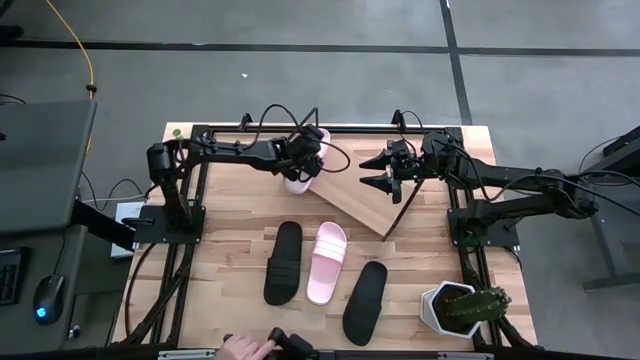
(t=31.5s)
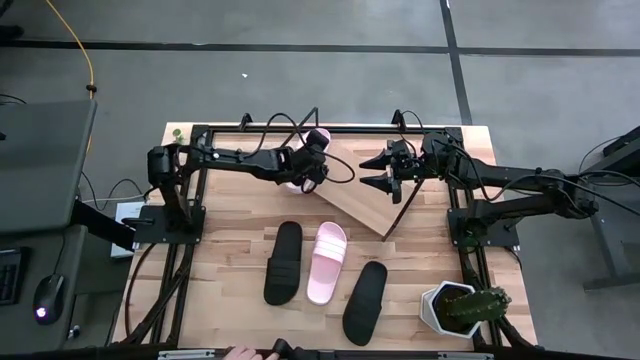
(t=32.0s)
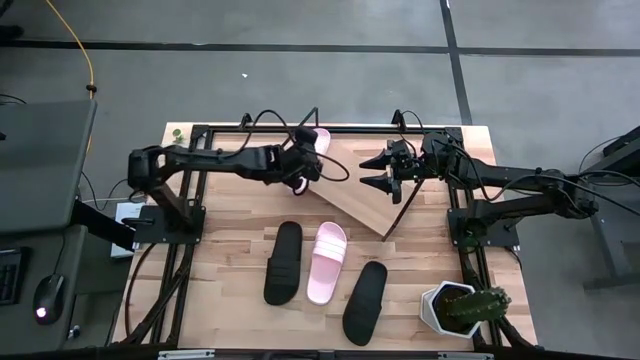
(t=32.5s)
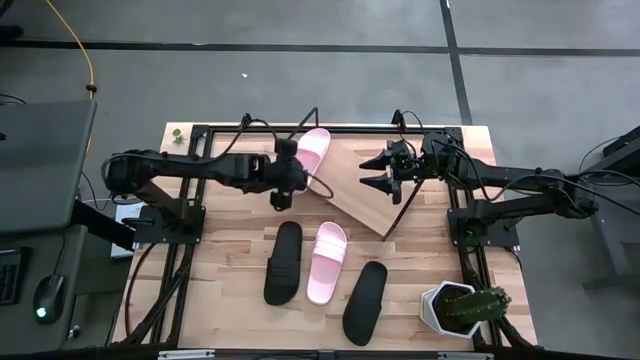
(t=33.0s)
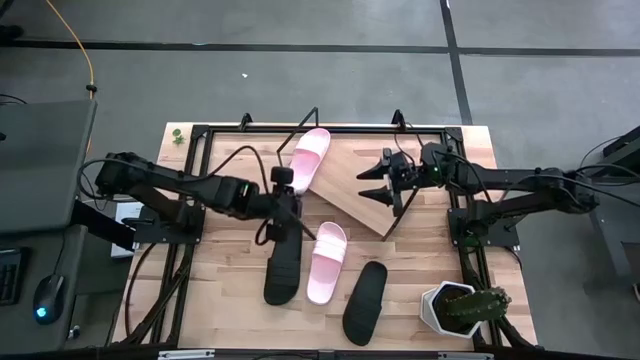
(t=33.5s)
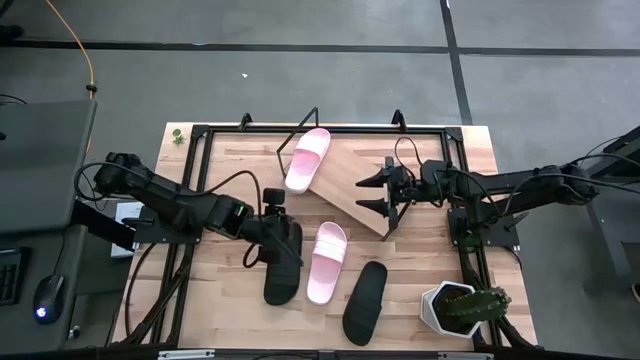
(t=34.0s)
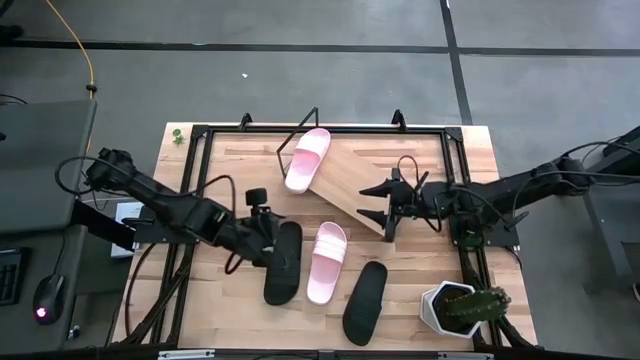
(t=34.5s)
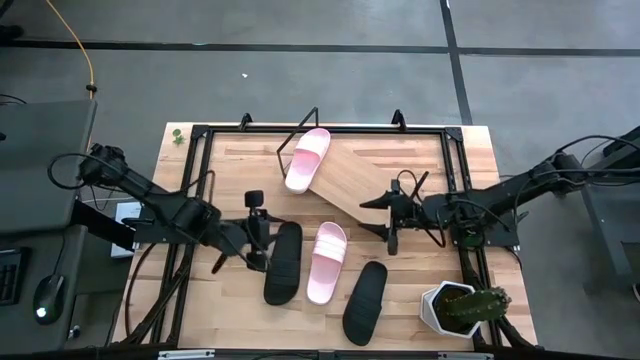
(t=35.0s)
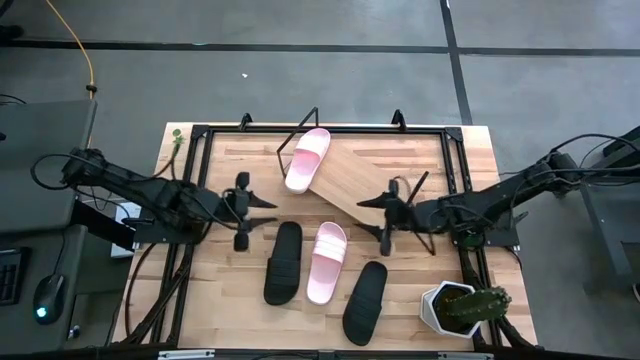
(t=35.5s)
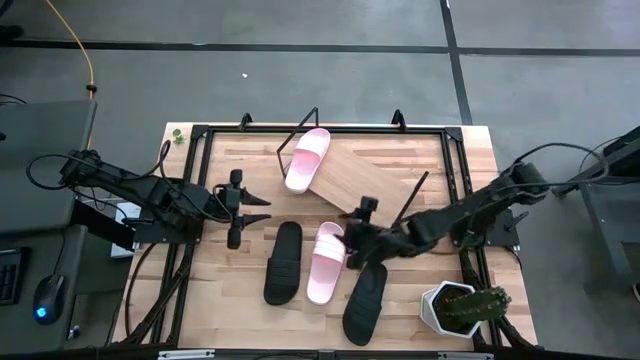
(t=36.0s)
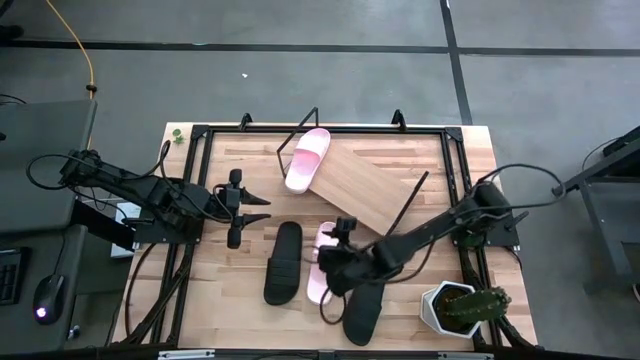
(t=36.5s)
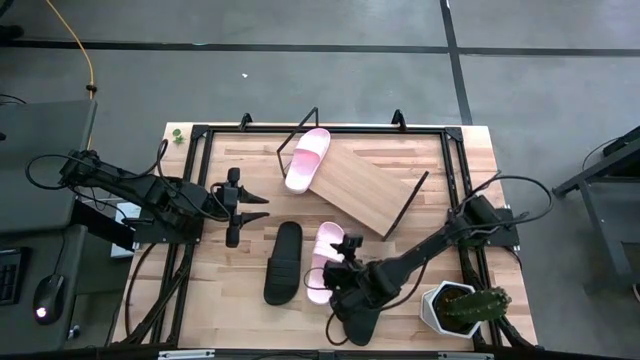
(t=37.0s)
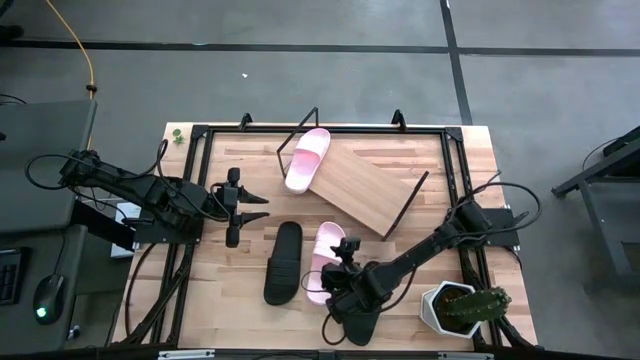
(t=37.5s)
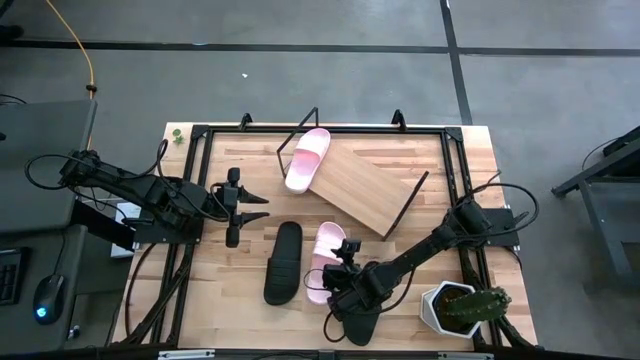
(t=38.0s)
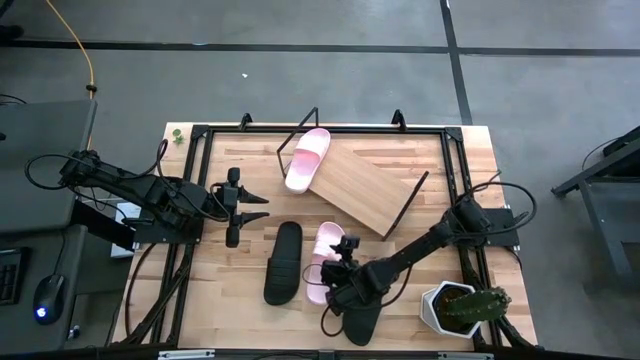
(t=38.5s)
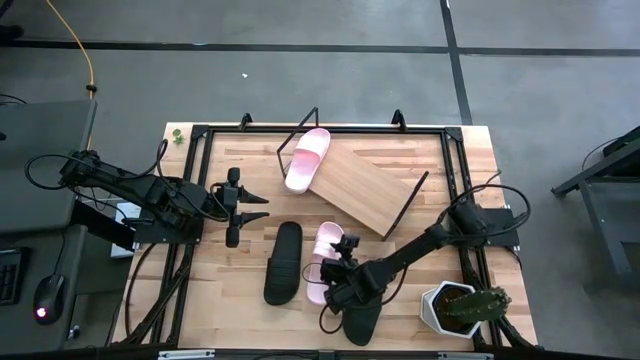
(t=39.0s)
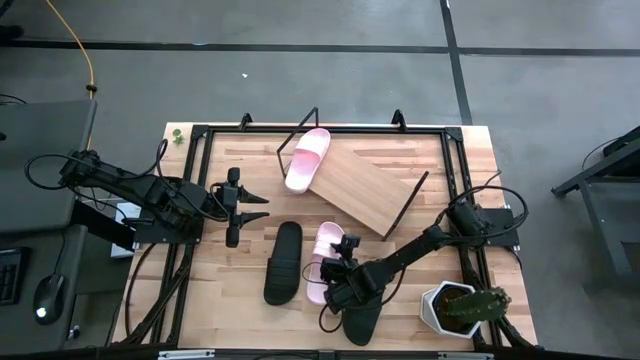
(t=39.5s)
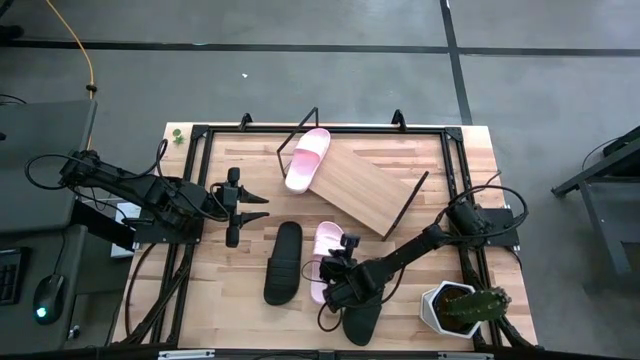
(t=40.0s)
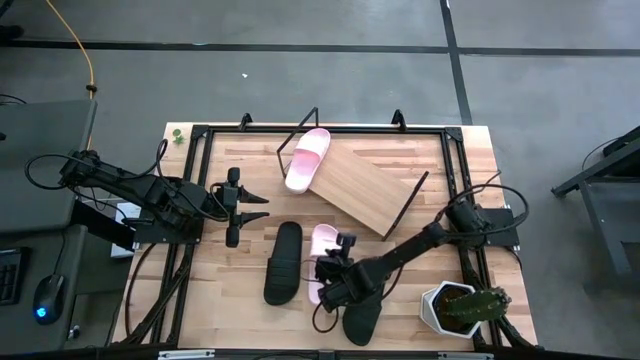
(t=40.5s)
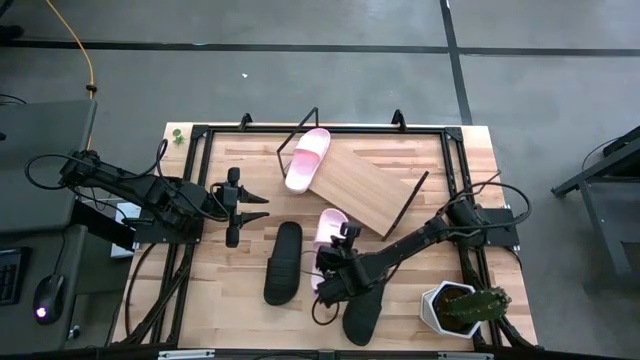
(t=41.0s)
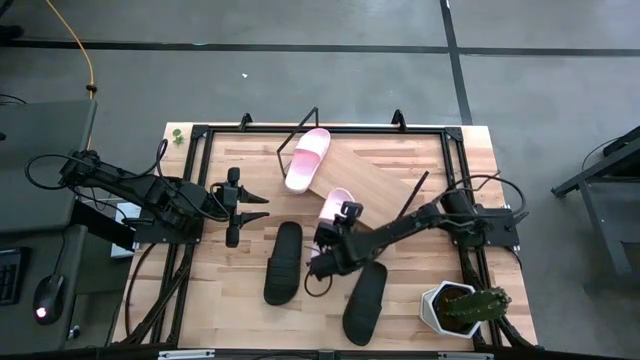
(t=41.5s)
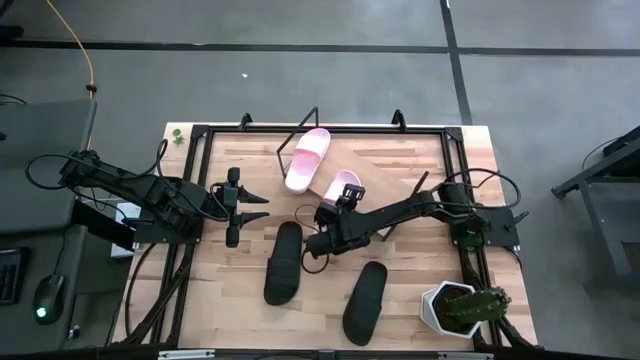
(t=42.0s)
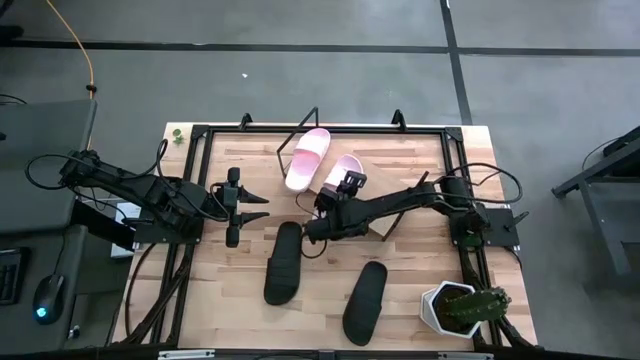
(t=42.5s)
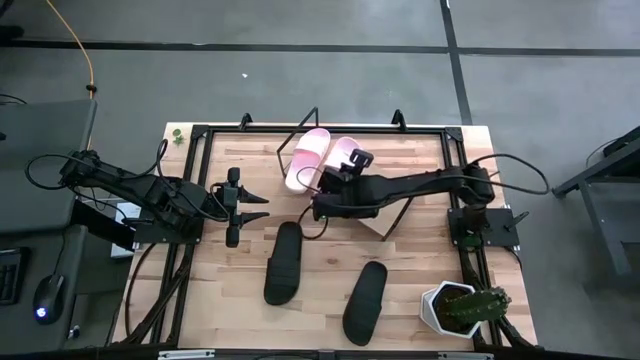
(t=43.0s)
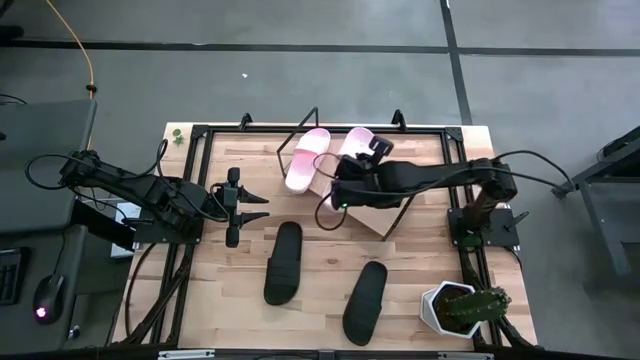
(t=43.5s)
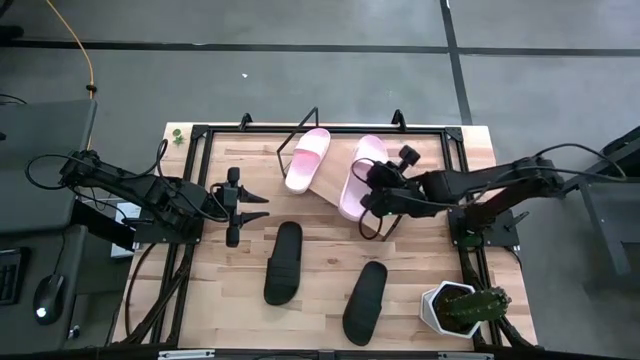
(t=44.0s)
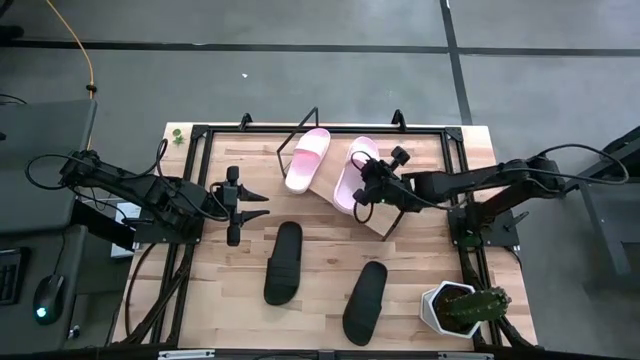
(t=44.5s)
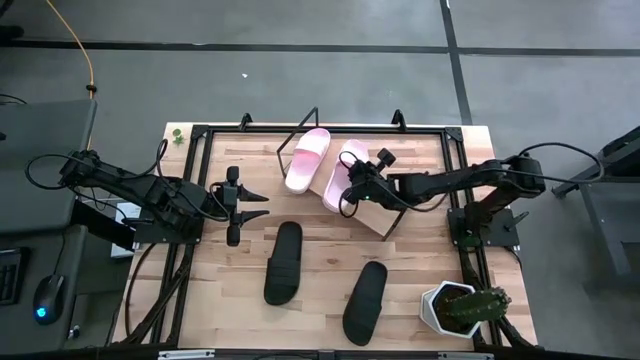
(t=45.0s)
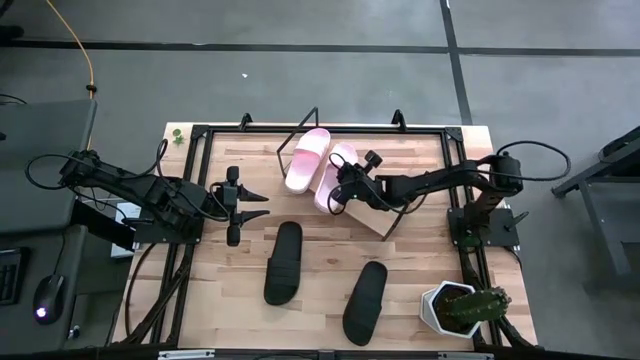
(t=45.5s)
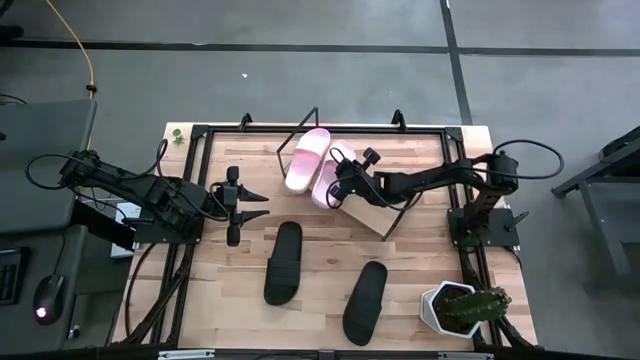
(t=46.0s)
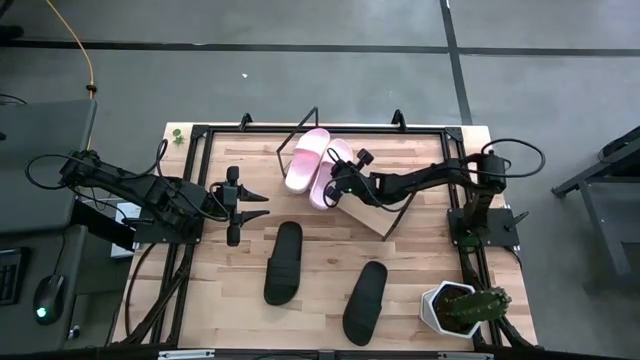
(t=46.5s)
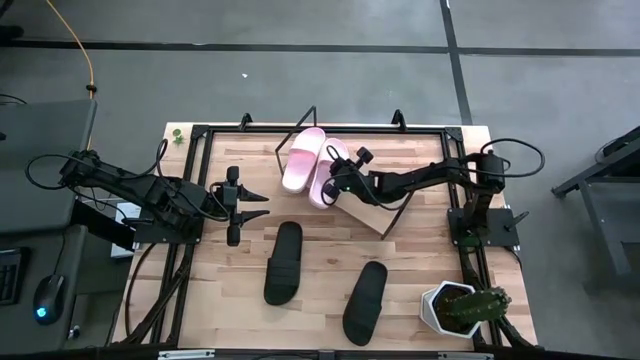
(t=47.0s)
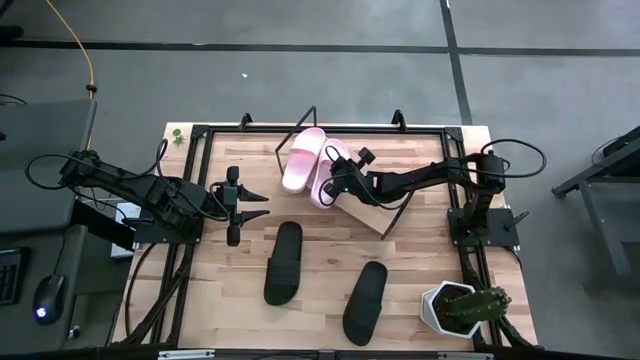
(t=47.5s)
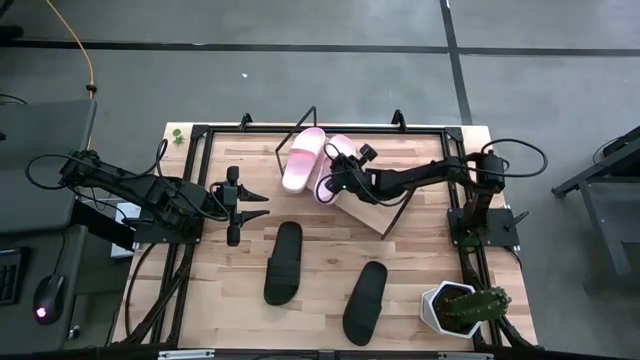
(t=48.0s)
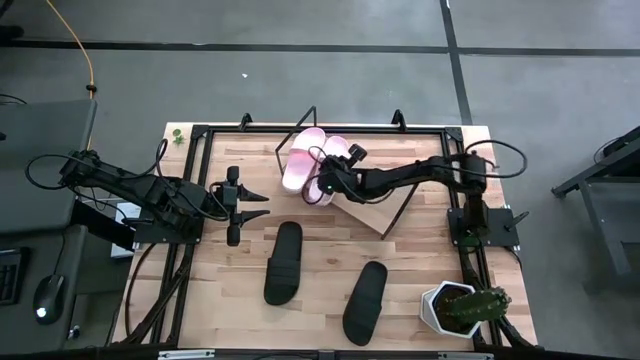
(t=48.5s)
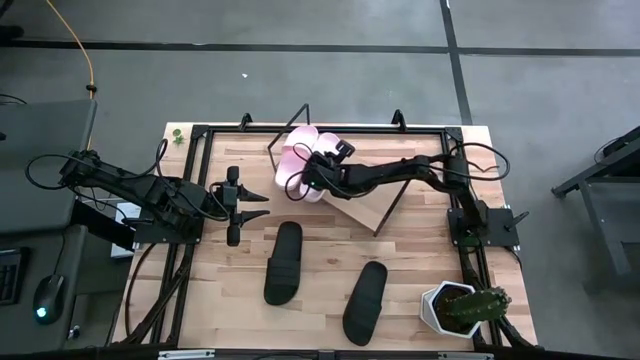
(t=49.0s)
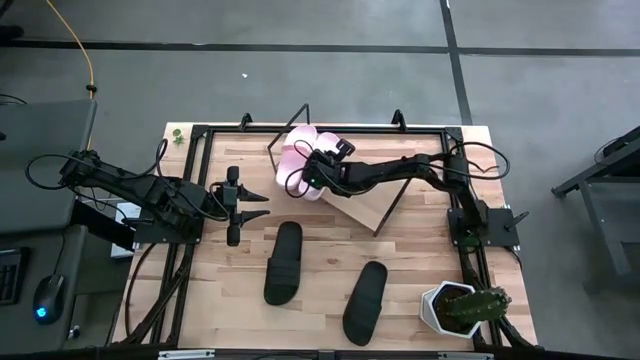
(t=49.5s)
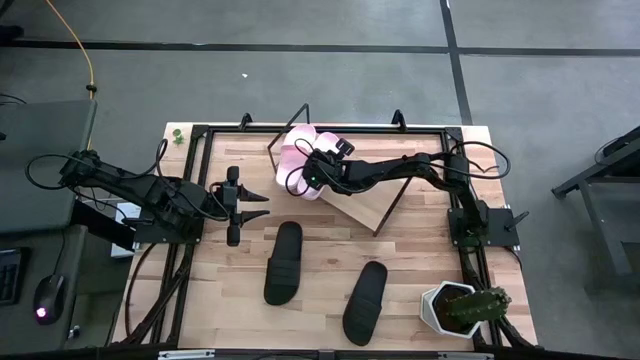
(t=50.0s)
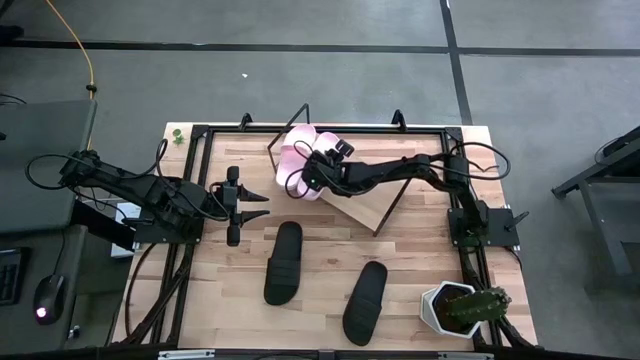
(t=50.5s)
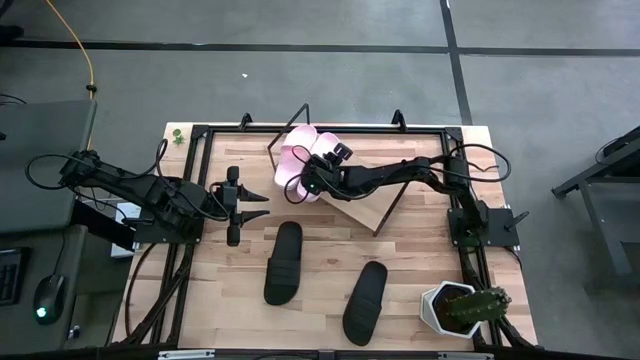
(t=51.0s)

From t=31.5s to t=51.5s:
Task: Pick and place slides into the shelf
Put the pink slipper on the shelf

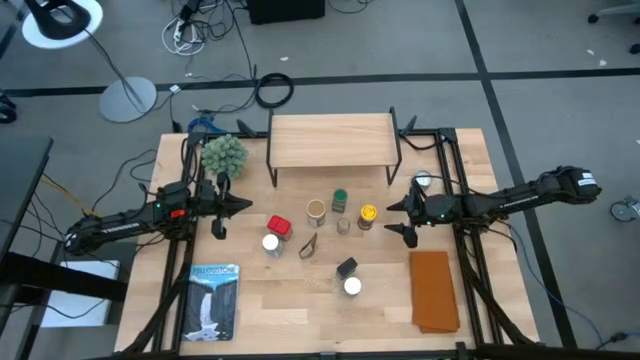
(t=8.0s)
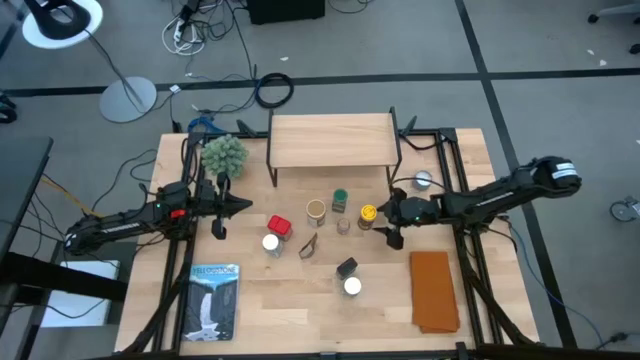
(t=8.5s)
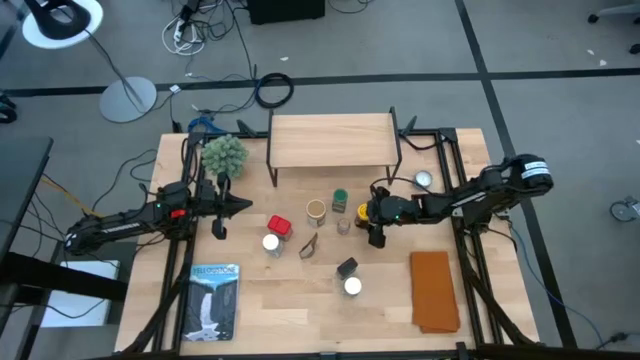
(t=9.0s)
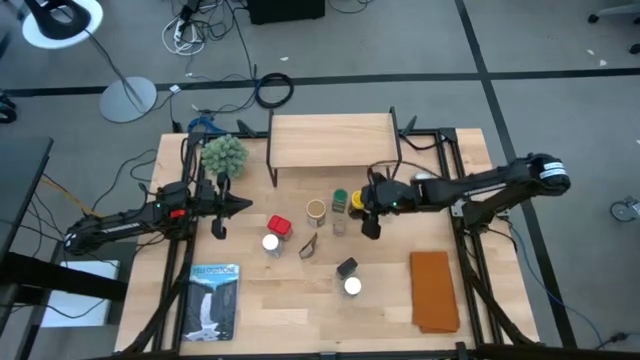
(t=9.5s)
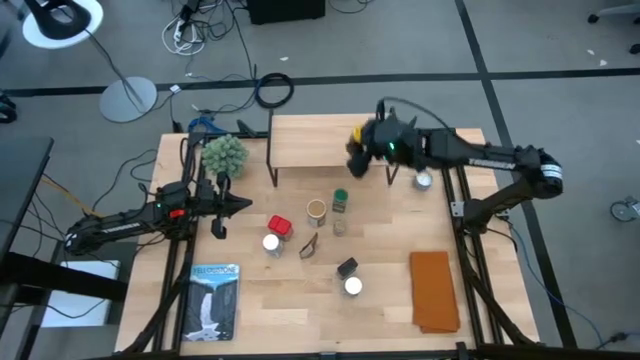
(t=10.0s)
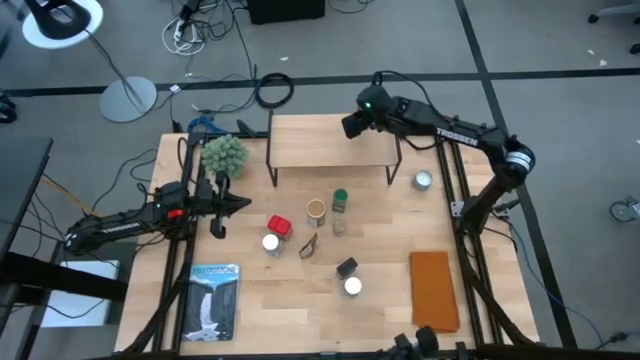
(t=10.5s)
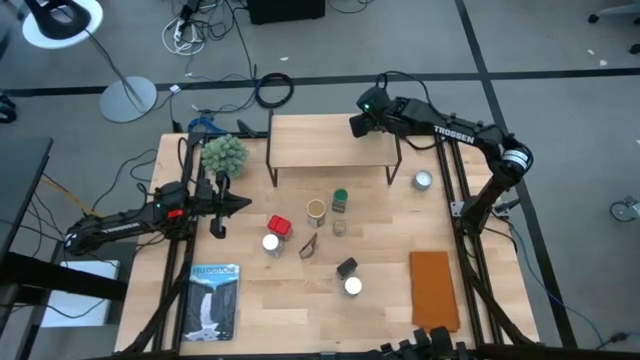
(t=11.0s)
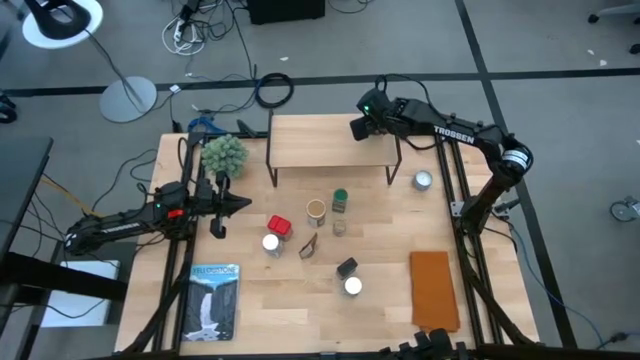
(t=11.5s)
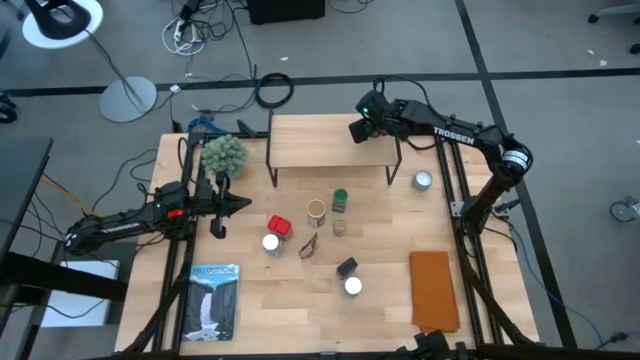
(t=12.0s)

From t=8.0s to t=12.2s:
Task: Shelf spices
Put the yellow seasoning bottle on the shelf
